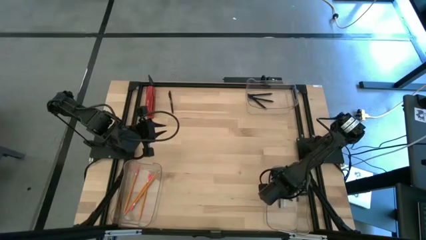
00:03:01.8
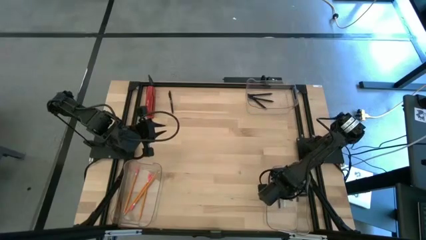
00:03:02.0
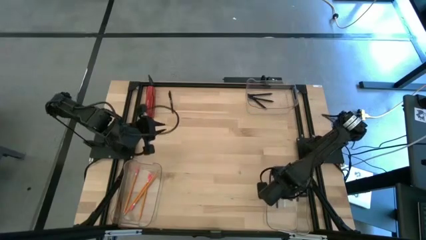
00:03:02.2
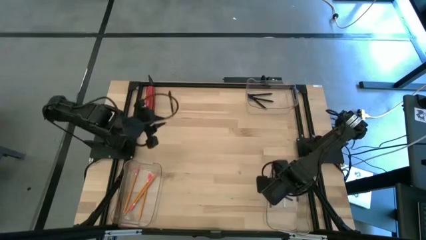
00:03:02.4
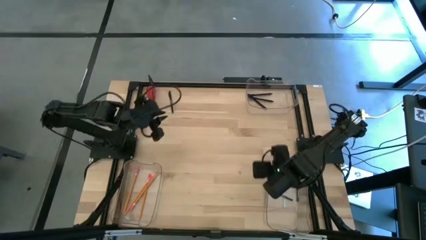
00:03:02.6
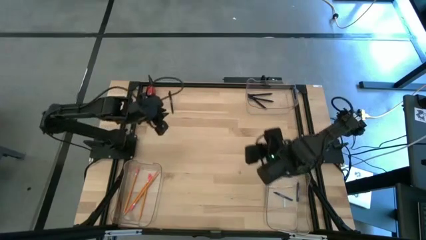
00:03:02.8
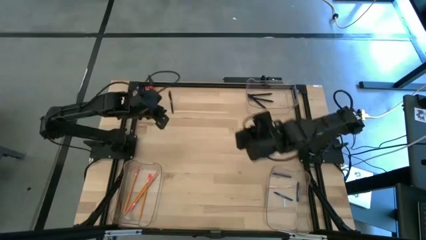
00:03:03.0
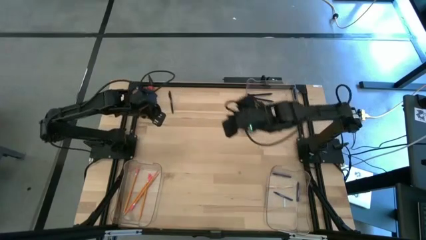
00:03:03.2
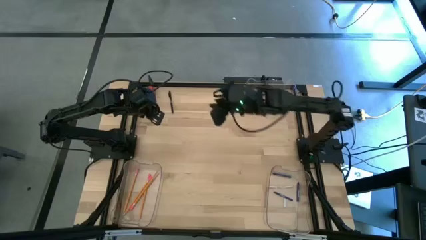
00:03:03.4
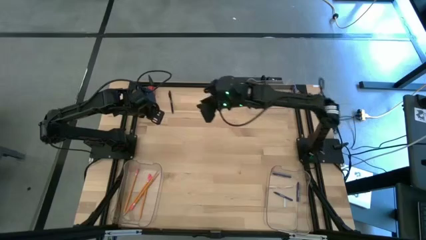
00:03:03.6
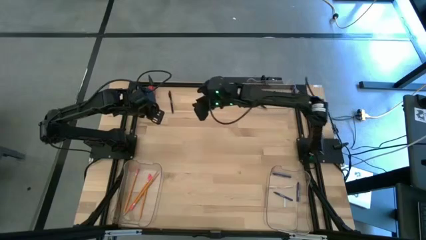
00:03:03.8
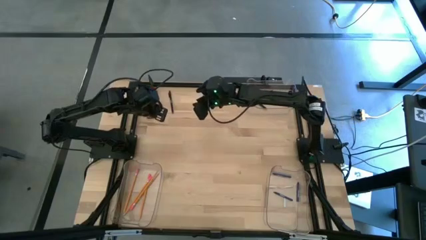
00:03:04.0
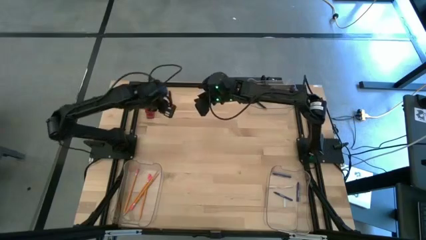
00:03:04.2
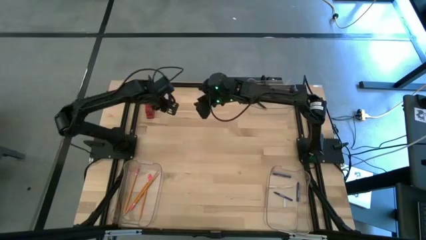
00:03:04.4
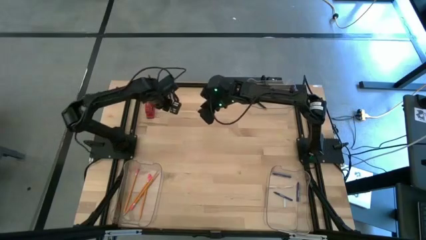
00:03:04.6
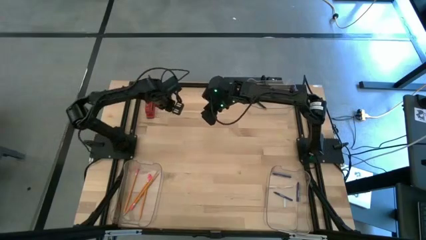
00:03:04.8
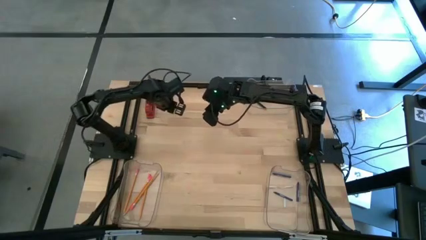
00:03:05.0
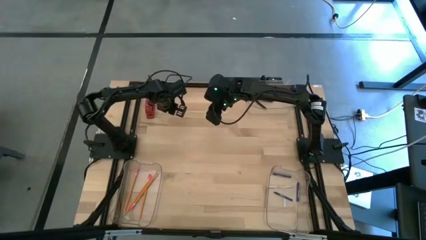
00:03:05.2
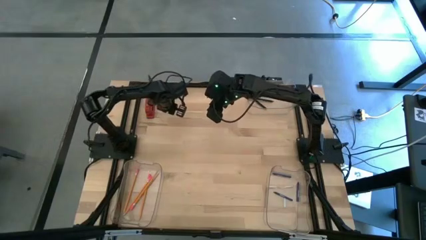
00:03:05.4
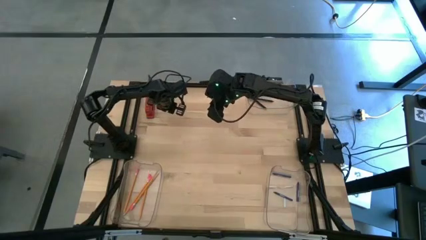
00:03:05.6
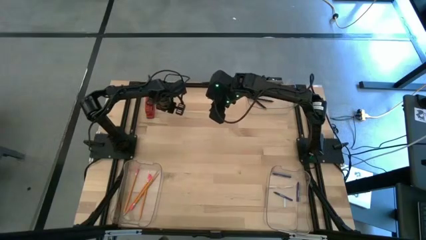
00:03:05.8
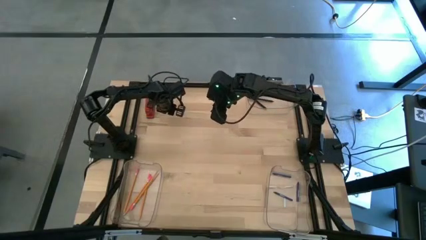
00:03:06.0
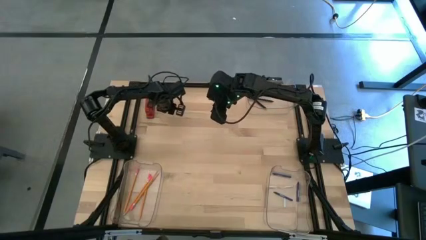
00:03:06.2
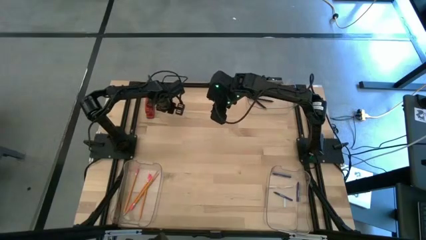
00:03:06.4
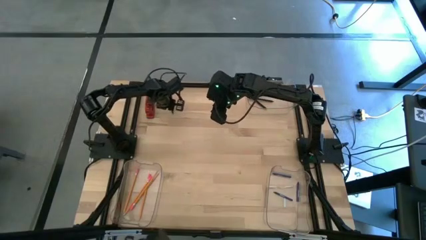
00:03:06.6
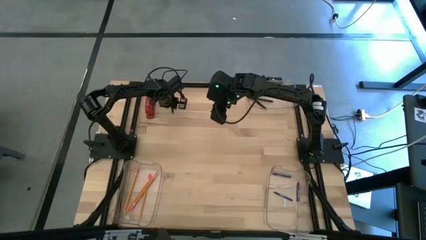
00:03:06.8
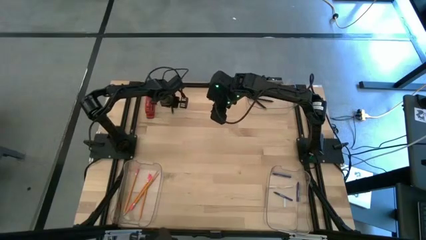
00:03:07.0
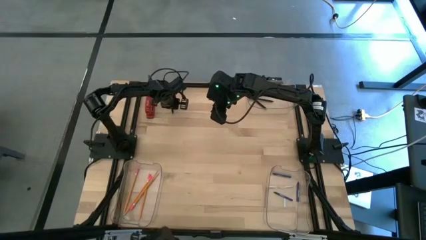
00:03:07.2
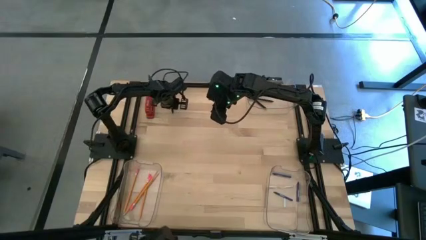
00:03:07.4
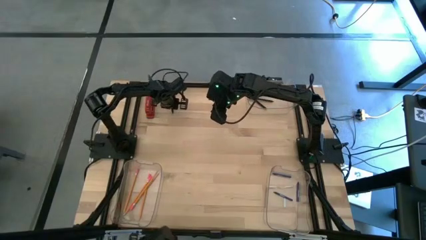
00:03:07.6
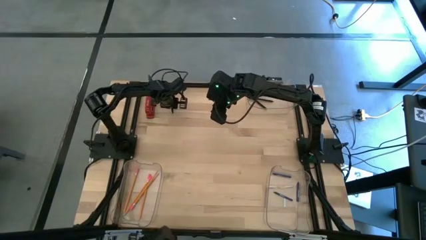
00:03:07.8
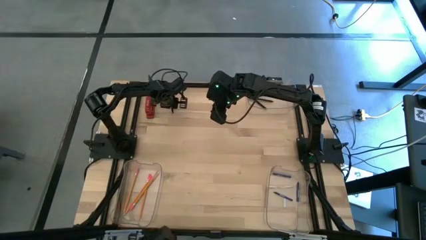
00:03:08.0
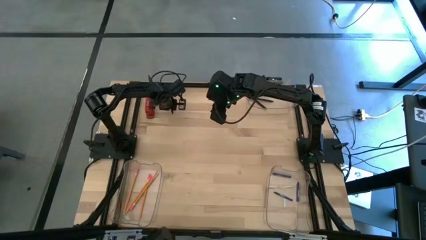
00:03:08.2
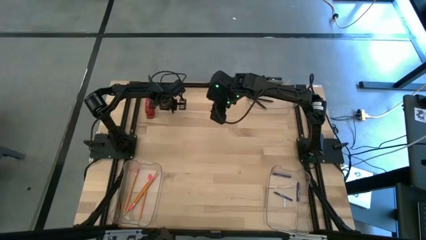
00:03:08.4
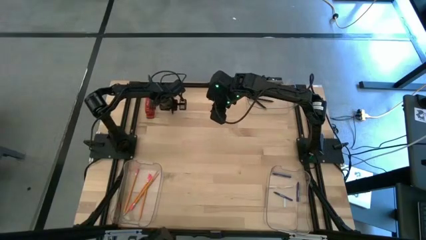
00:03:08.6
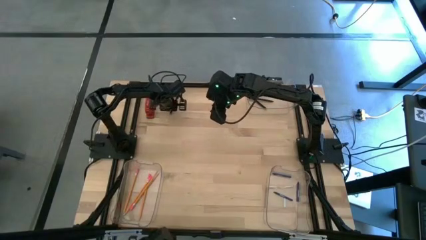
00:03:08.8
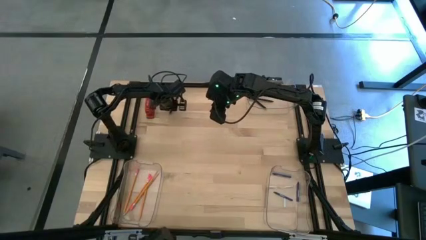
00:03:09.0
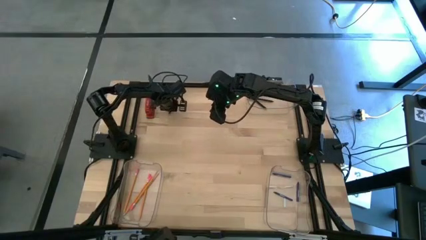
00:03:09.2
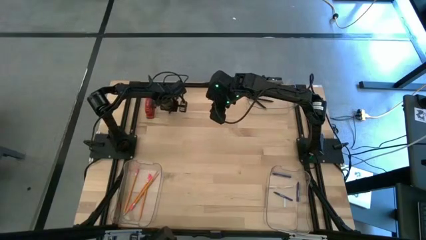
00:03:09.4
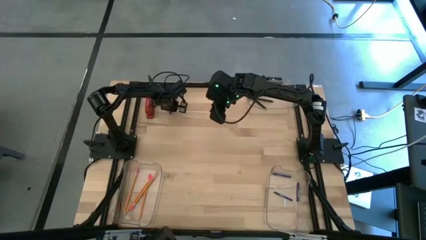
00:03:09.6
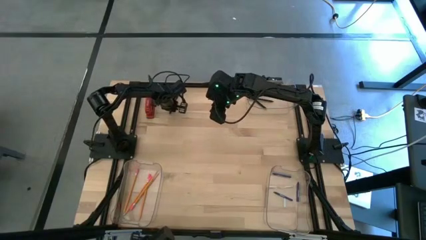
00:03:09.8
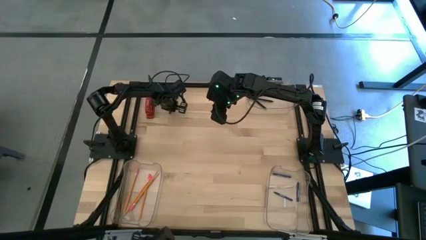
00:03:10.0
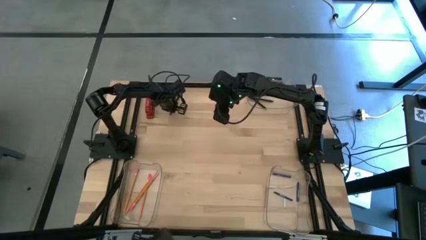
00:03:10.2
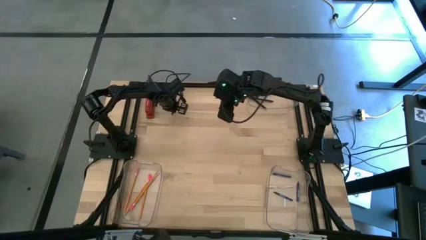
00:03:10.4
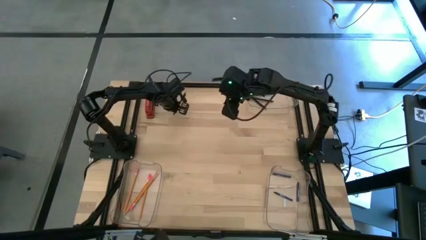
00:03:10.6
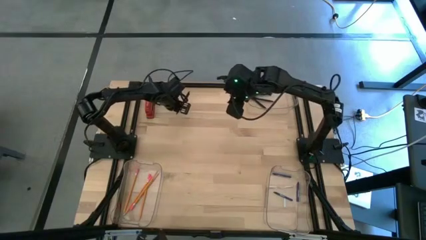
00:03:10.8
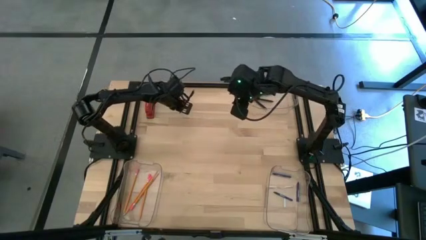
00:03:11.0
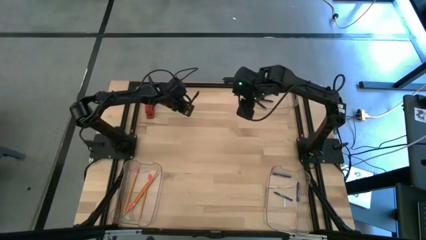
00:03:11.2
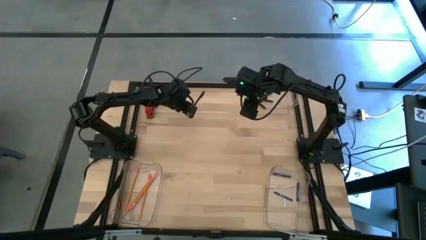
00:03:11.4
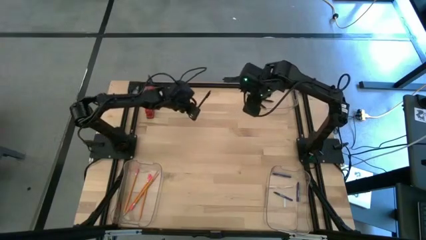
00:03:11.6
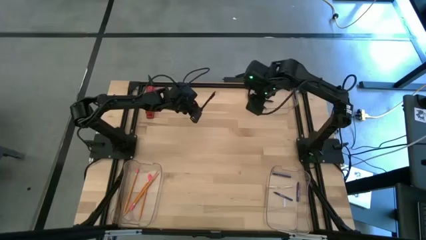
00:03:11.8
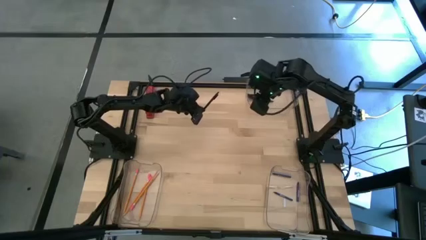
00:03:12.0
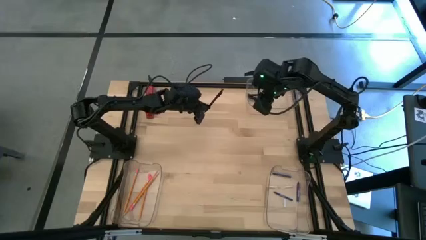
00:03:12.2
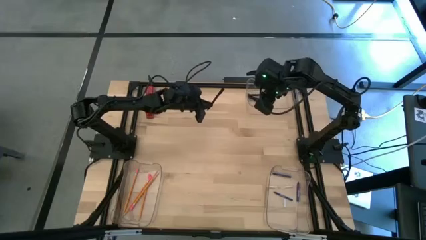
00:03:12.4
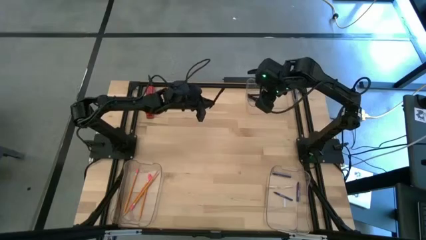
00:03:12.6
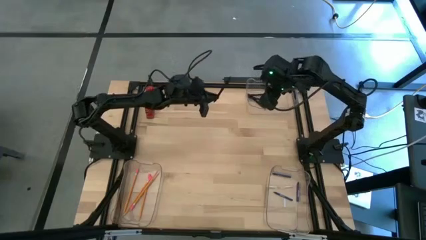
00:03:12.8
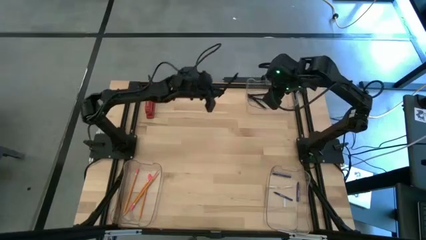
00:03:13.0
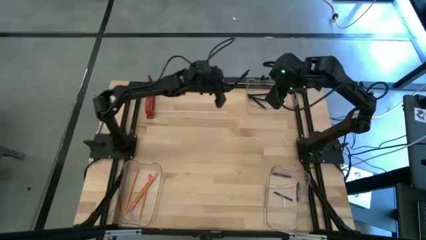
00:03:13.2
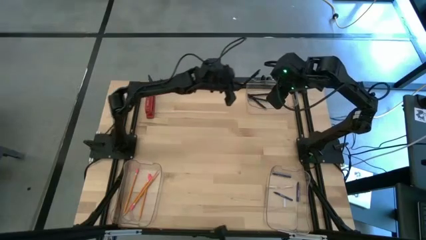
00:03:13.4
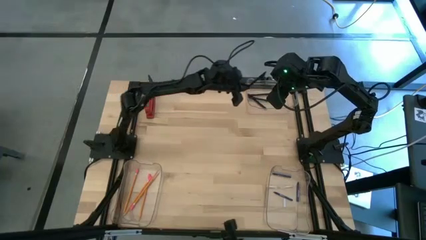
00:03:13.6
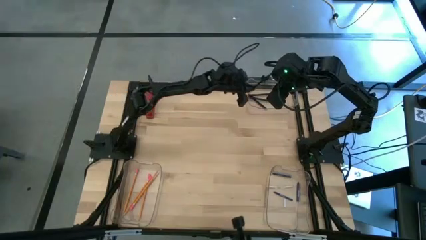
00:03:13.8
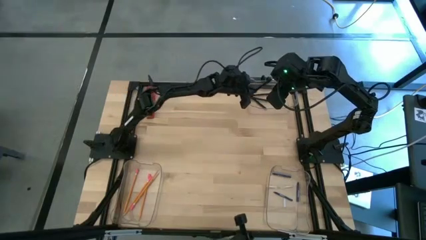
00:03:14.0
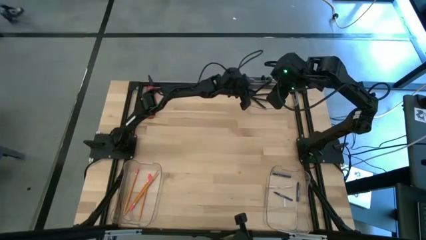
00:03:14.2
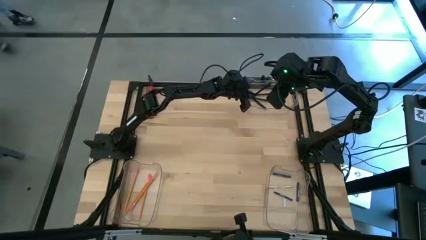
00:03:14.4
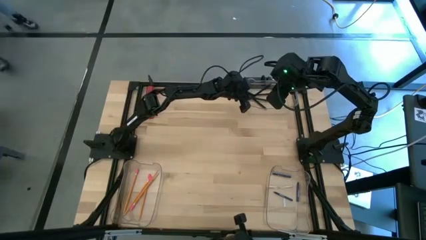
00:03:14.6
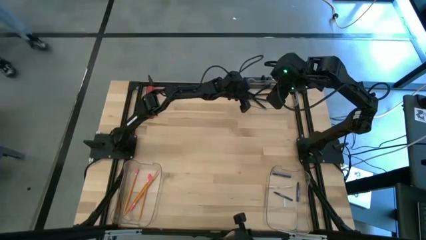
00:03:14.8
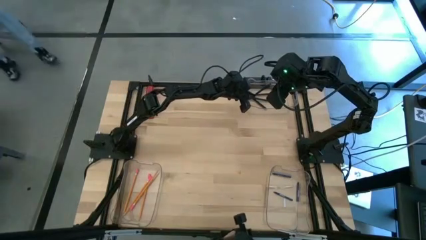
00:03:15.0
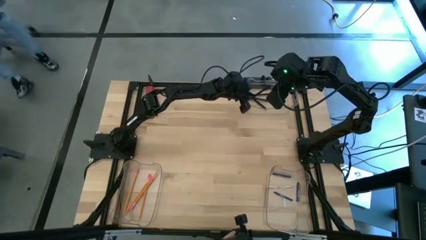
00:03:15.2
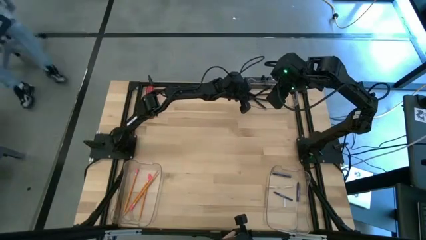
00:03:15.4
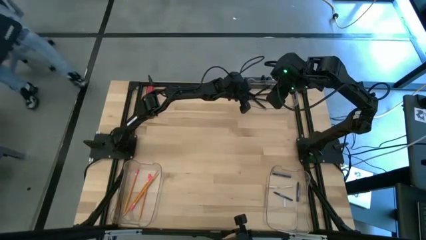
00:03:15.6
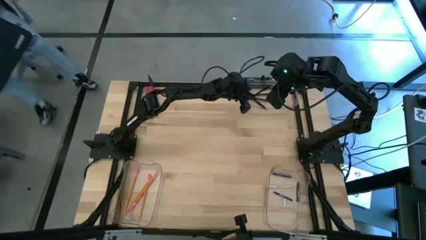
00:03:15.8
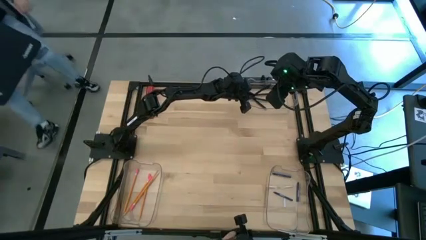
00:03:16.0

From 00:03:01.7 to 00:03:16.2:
Task: Sort crayons/erasers/pens/pencils in bins
Put the black pen into the top transparent bin
